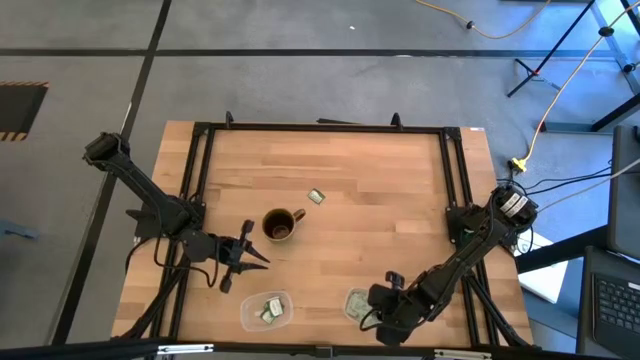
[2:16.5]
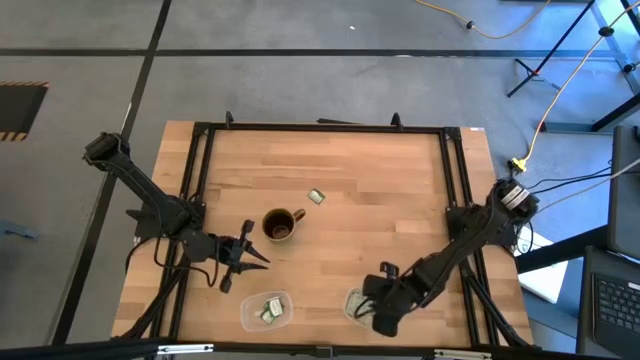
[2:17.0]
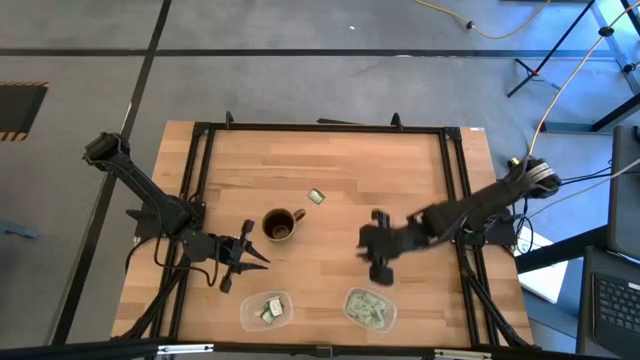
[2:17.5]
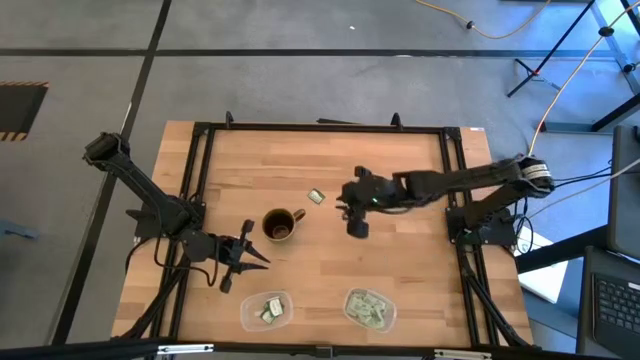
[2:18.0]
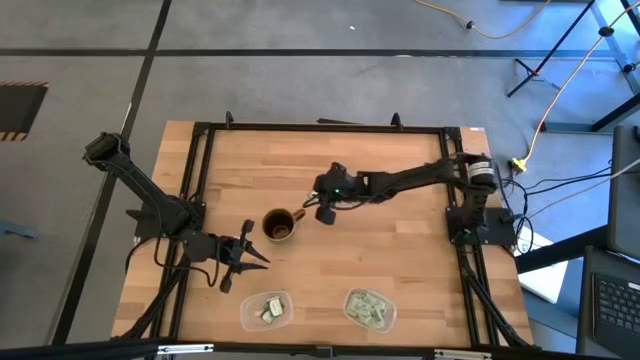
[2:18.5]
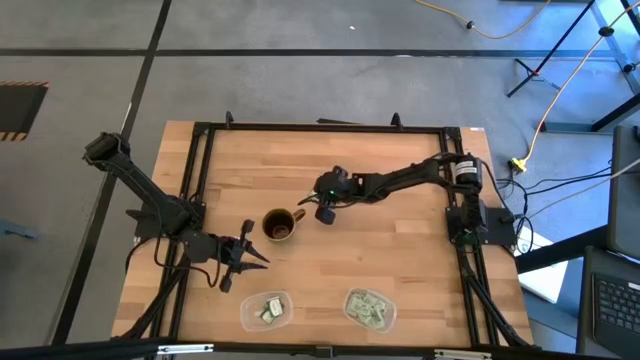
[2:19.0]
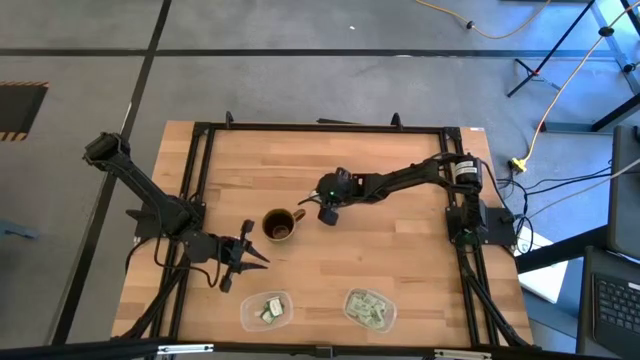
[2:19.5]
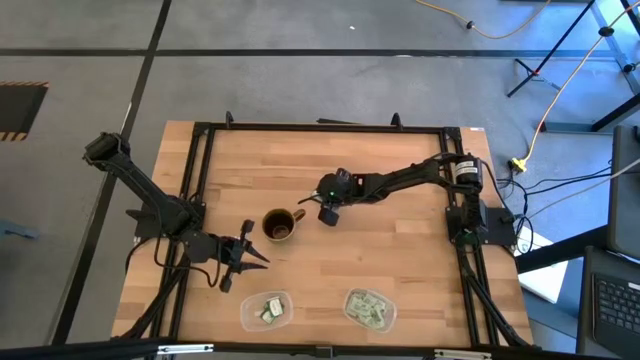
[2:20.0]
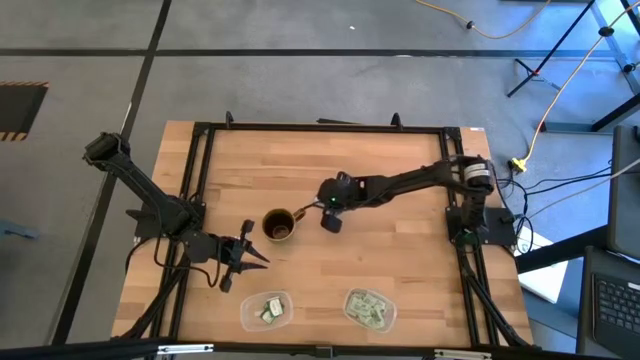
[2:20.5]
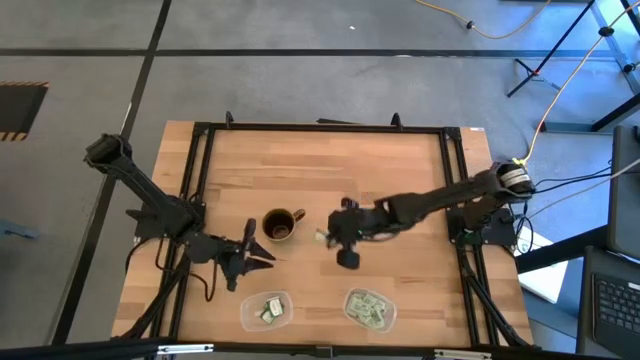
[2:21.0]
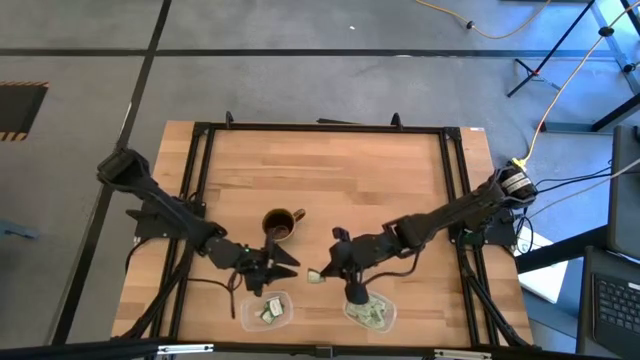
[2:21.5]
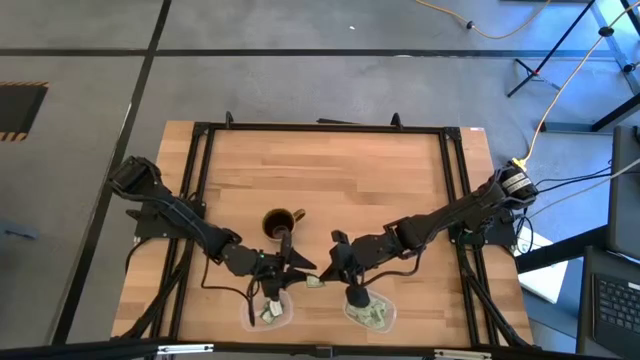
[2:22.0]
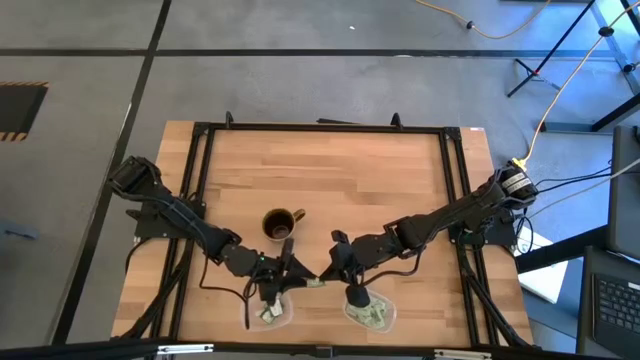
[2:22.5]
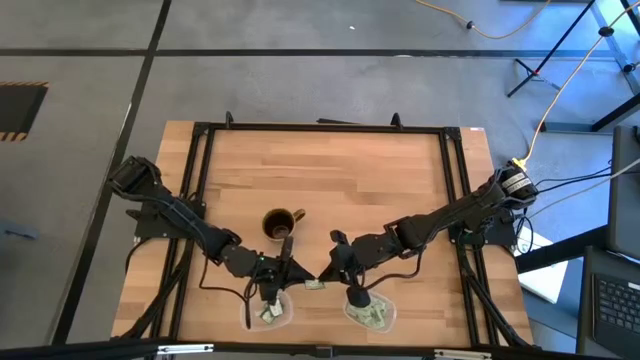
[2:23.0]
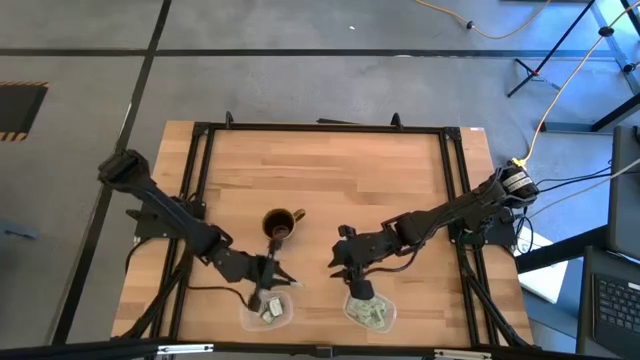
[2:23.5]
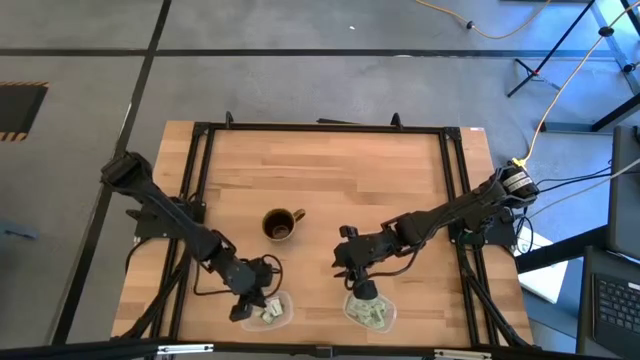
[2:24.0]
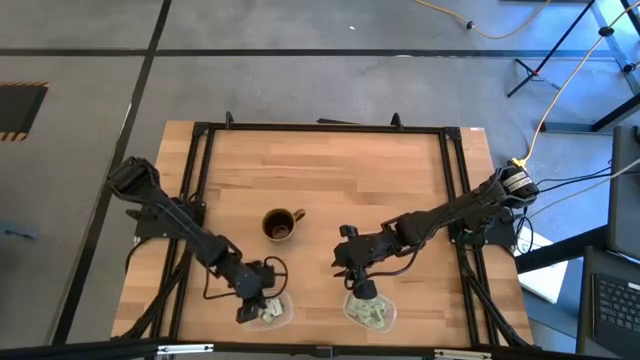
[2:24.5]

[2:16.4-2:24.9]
Task: Pick and place items into bin
Put the green stevia packet into the left transparent bin

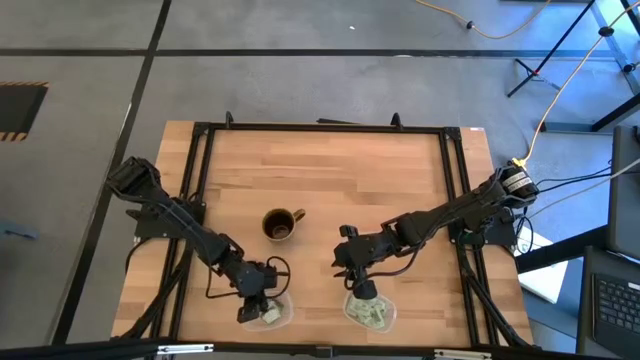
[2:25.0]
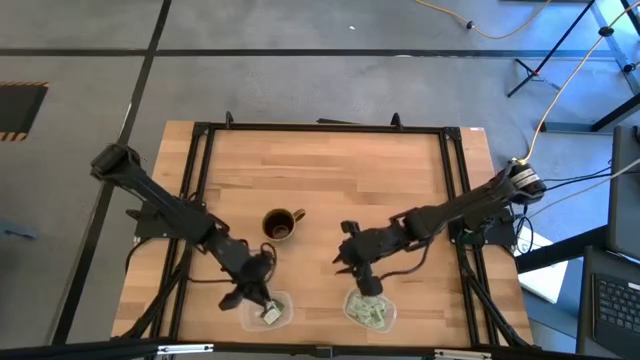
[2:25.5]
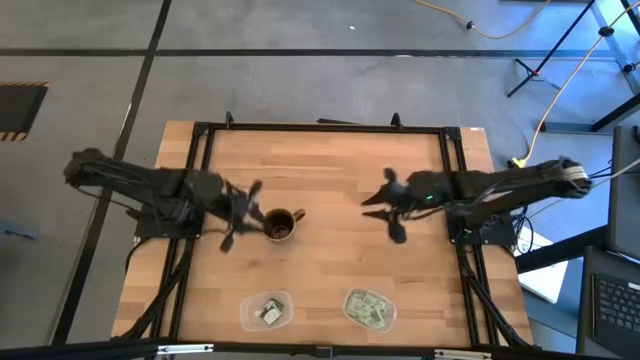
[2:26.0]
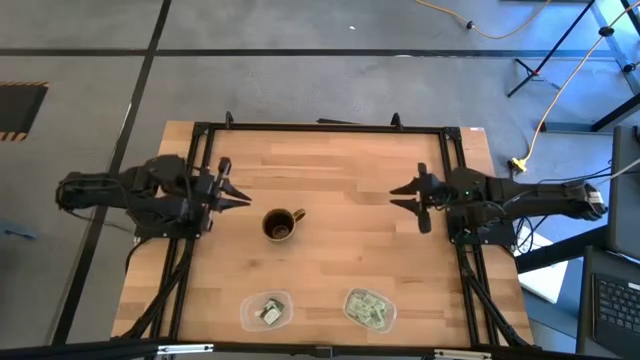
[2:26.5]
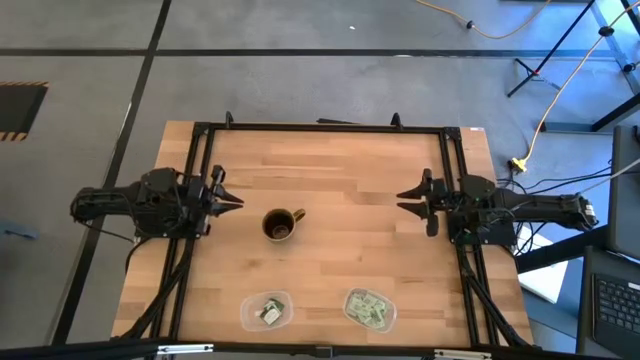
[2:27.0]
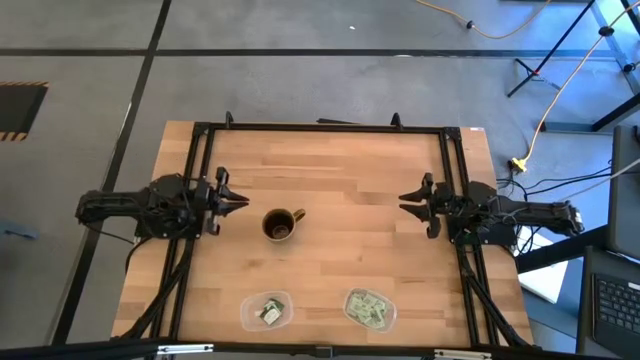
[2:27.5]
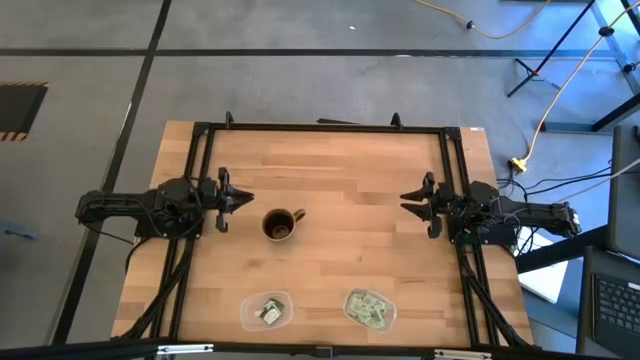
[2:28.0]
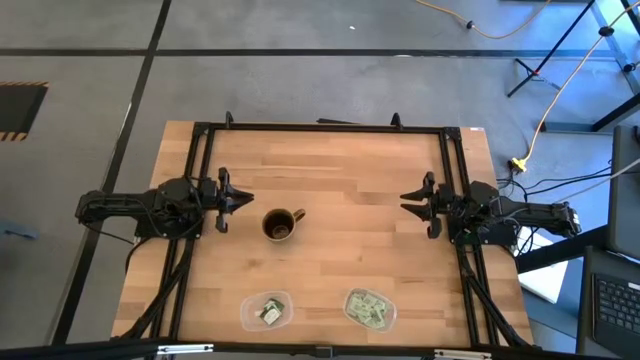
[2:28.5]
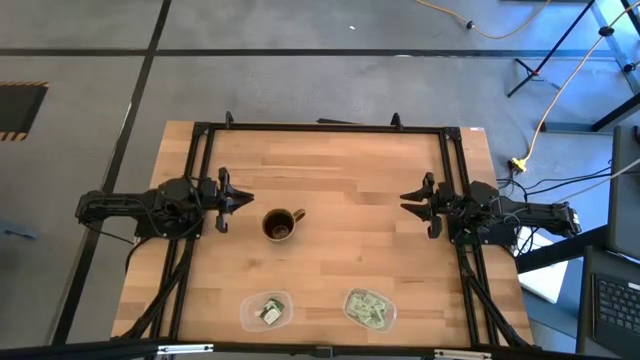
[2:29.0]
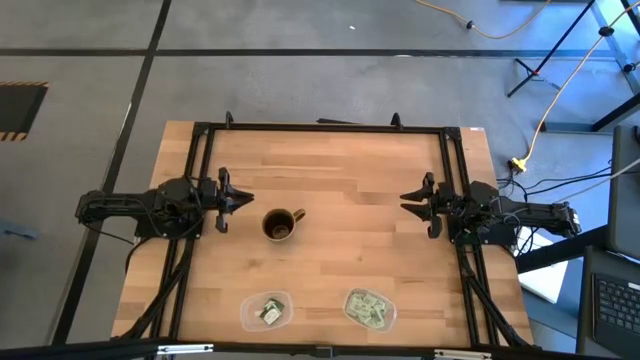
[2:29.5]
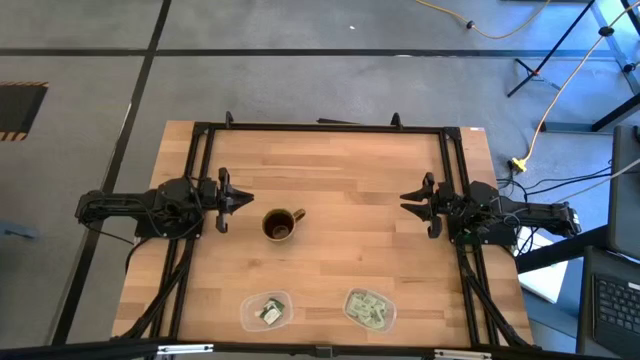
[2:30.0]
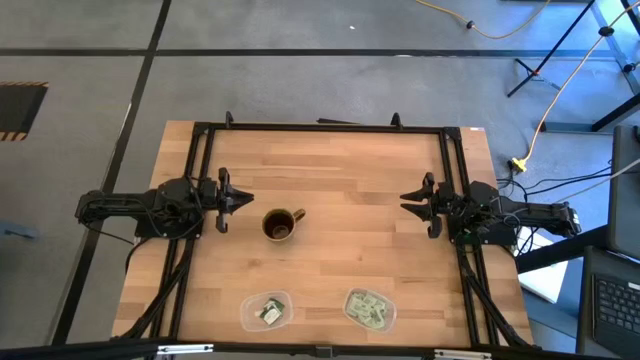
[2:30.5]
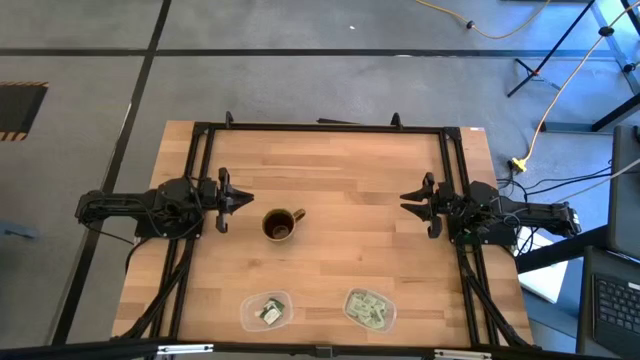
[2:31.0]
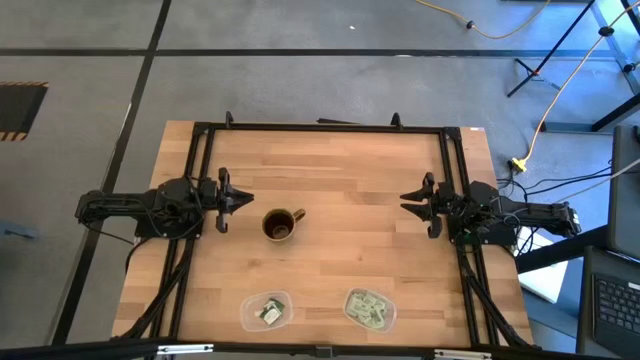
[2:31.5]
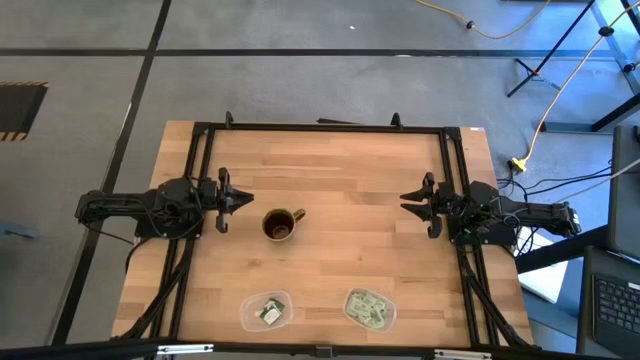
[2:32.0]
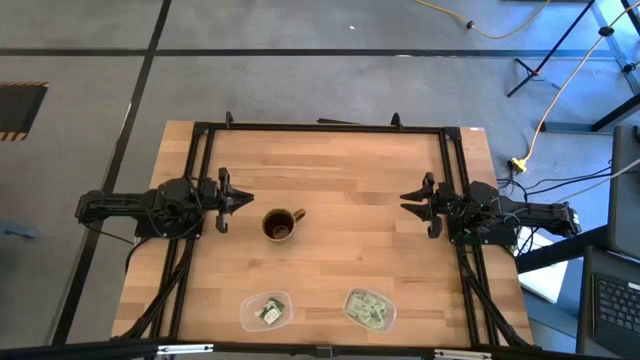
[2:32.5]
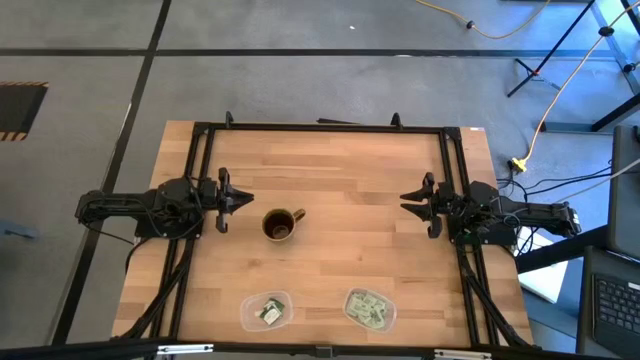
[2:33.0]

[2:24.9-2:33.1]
Return to Home Position

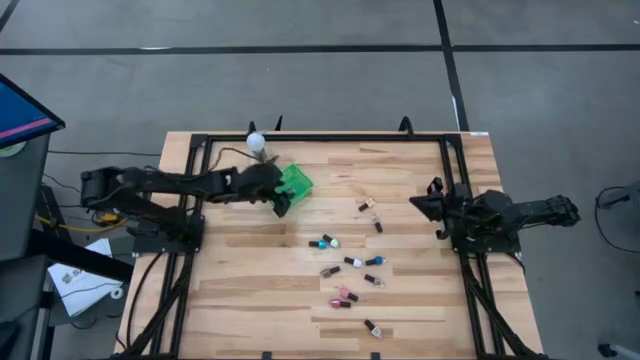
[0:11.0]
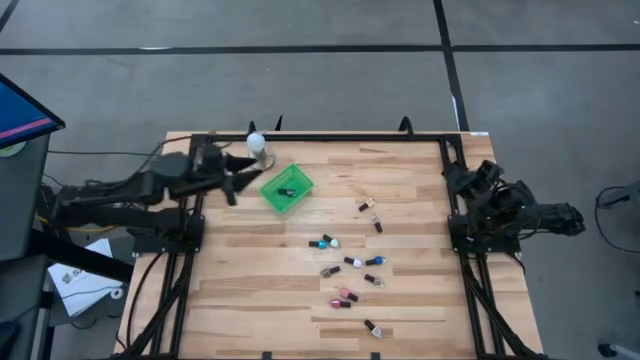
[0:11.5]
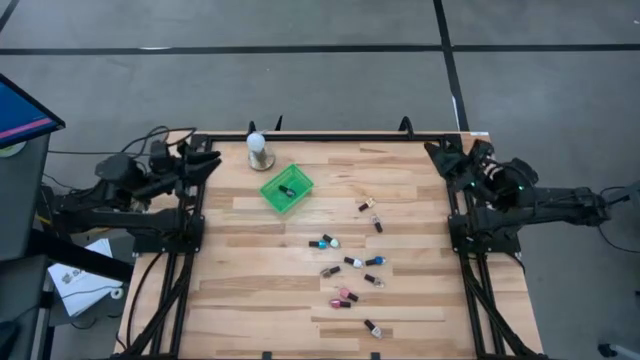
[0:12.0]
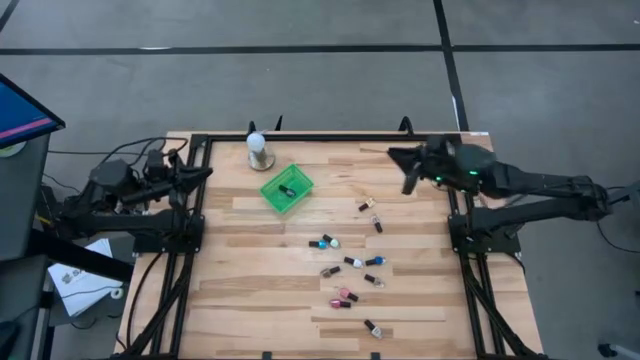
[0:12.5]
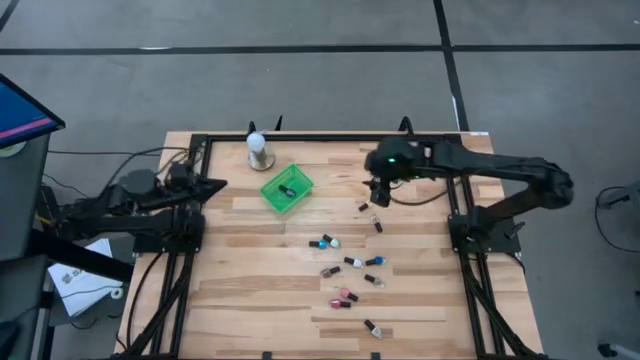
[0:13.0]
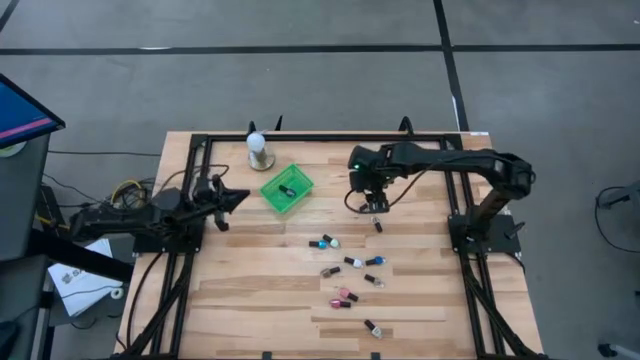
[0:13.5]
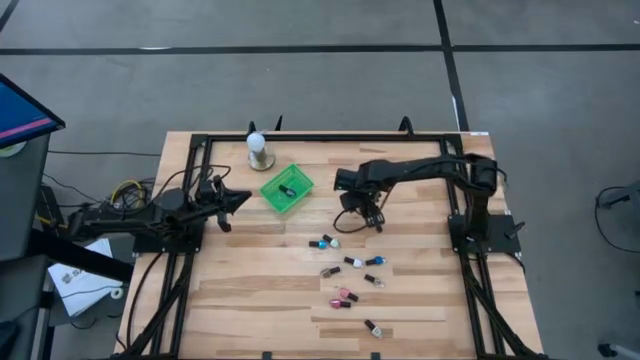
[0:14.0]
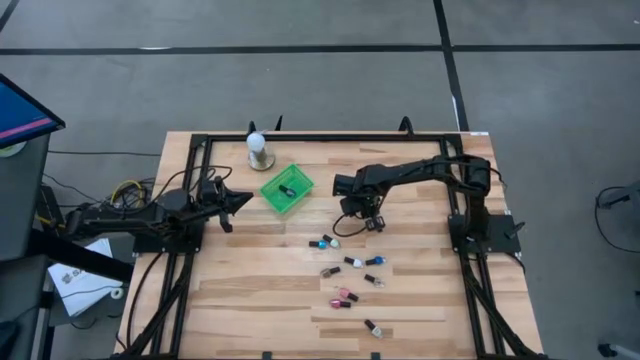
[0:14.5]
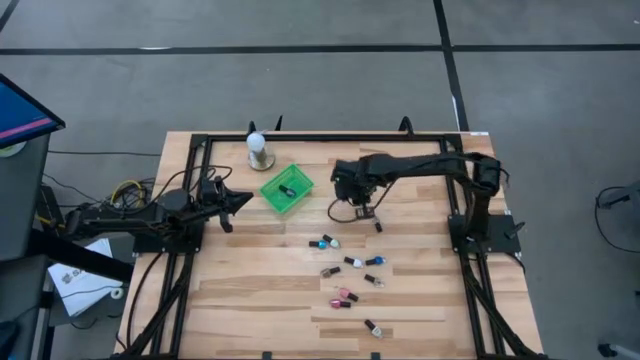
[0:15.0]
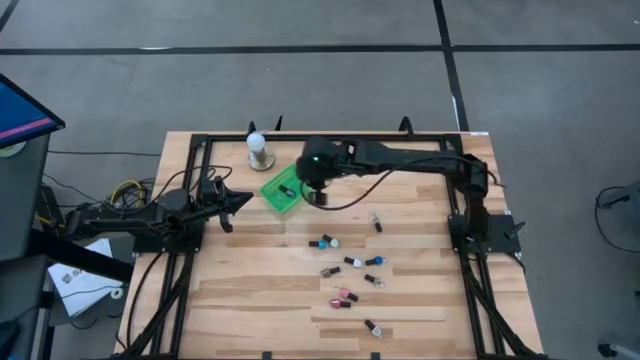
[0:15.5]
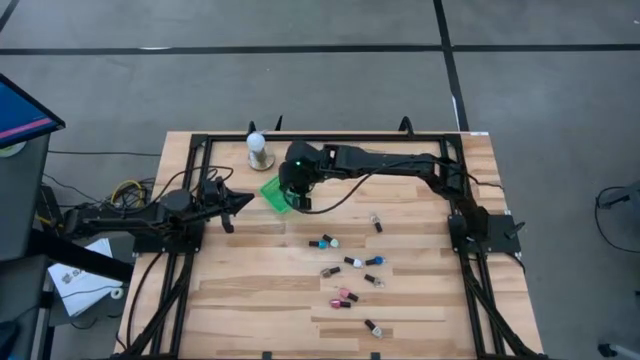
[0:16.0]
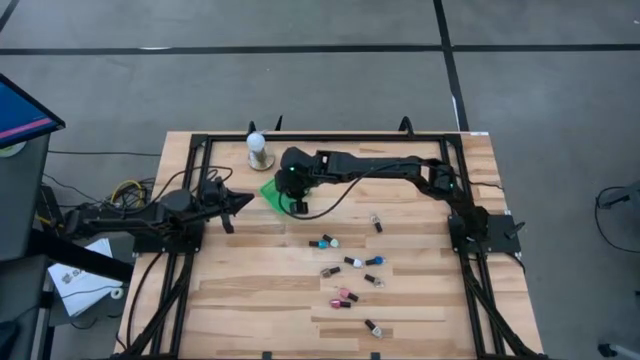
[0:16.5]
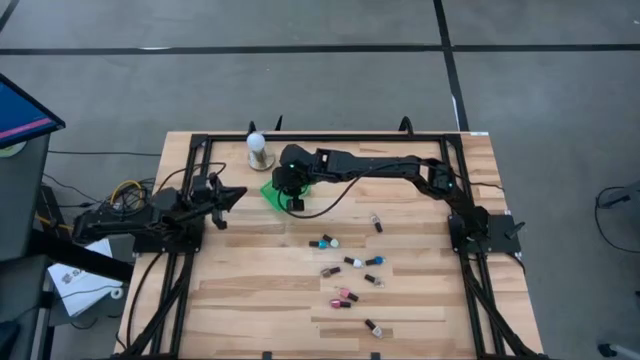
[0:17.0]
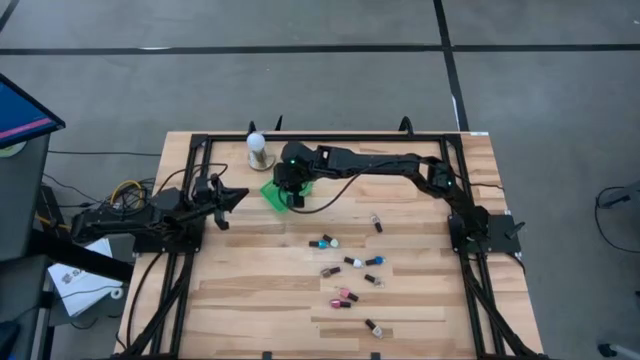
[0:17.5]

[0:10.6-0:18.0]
Task: Pick & Place Nail Polish
Put the light yellow nail polish bottle into the green bin
